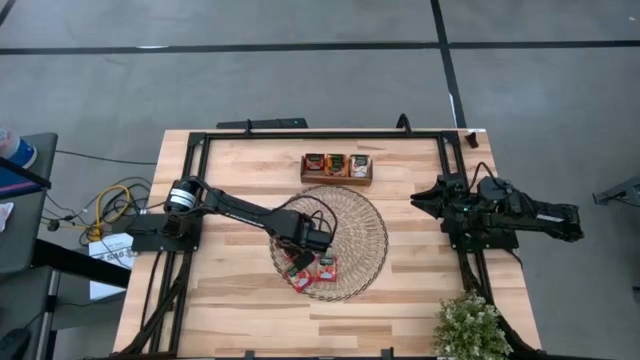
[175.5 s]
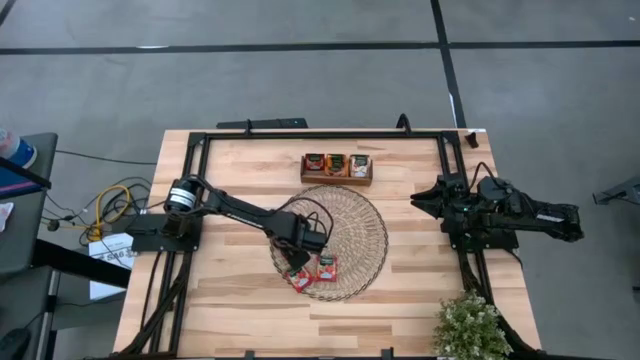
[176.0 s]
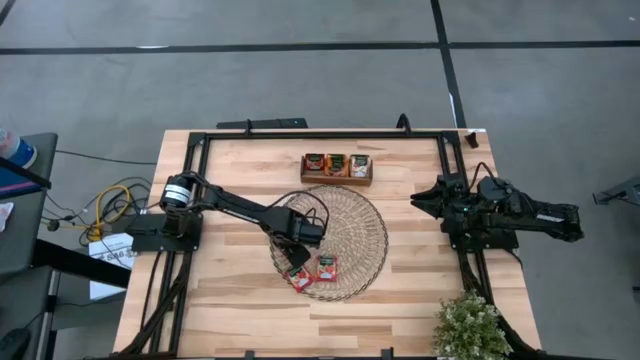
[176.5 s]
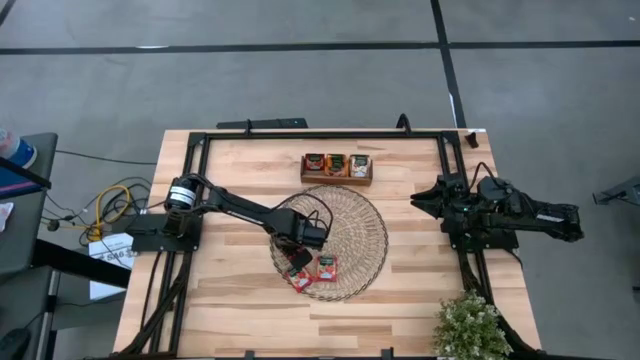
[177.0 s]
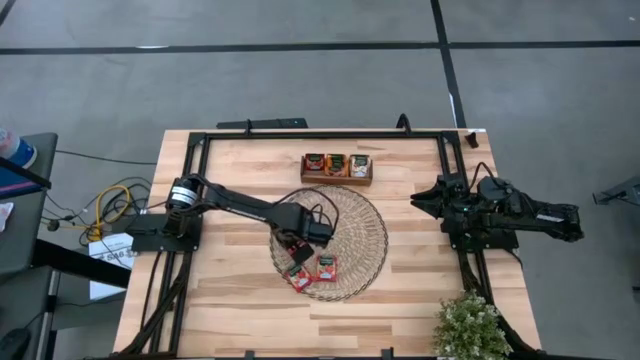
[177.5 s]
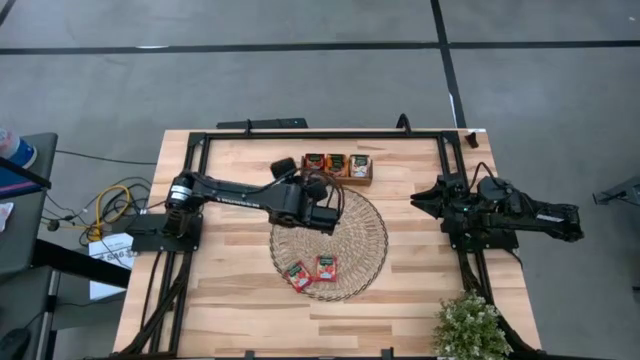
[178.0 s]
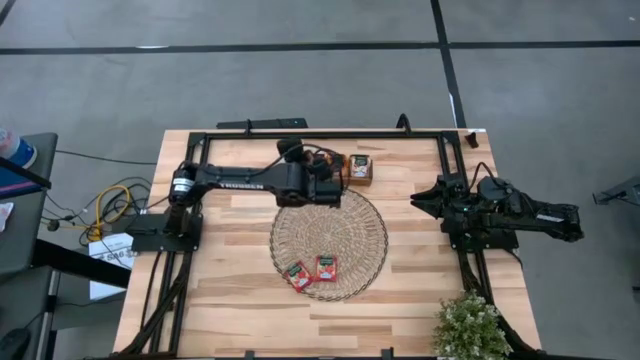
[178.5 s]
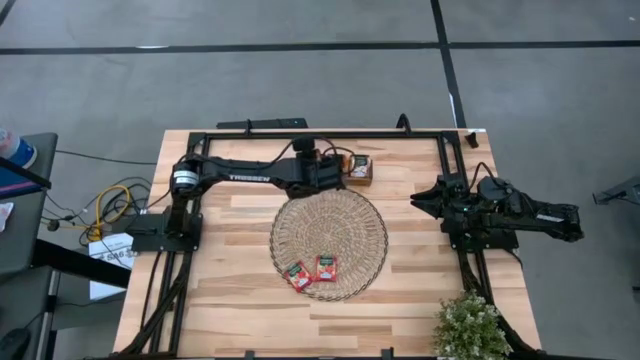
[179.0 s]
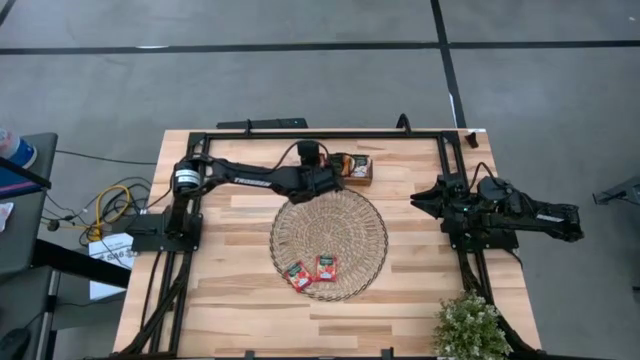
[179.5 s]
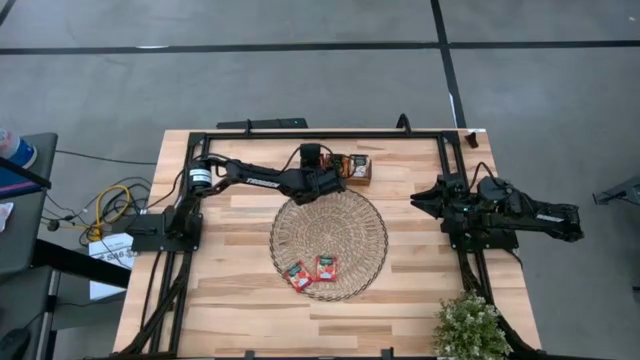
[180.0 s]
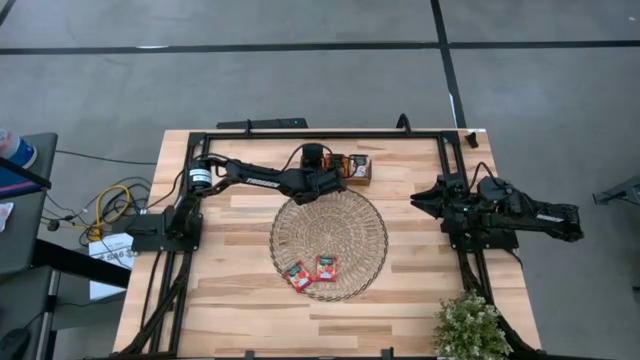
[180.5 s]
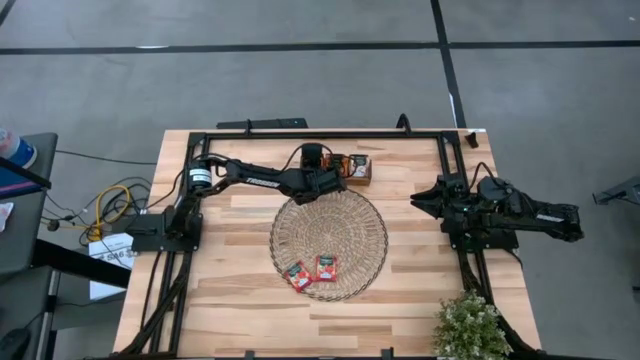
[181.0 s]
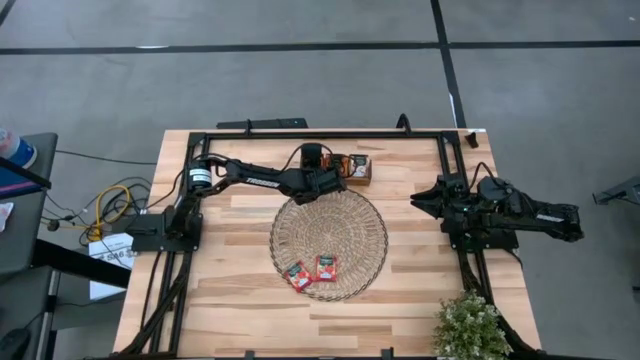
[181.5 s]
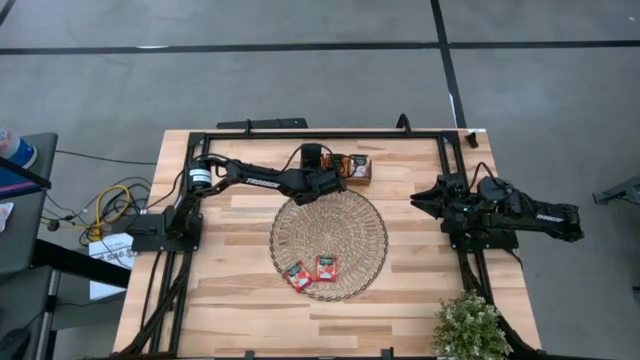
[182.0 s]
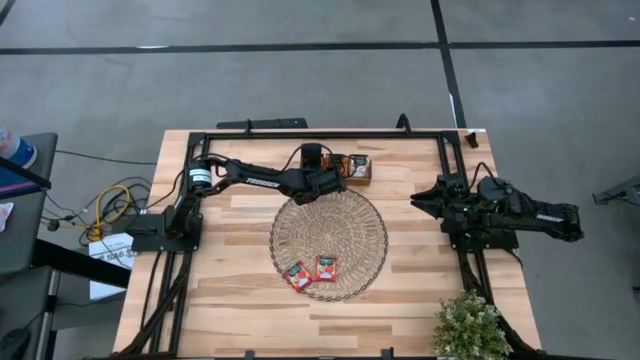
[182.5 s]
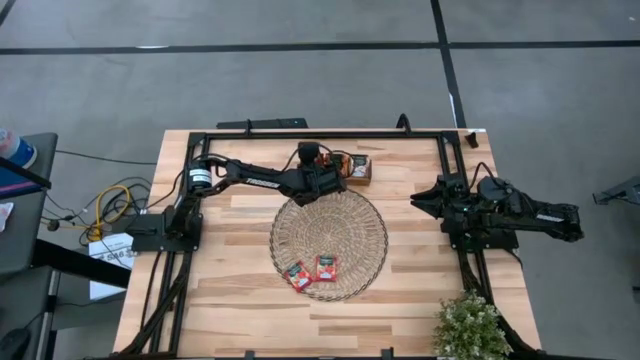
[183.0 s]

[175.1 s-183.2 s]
Task: Pick & Place Tea
Put the top red tea bag into the left slot of the wooden organizer

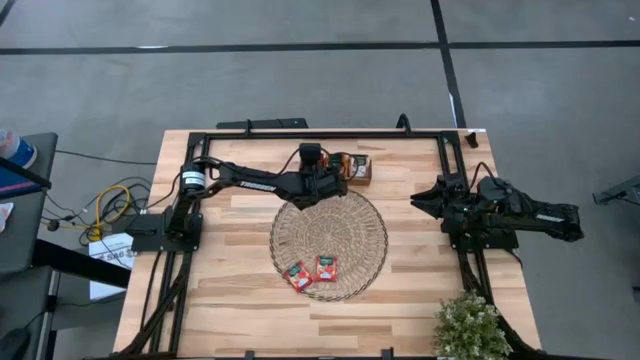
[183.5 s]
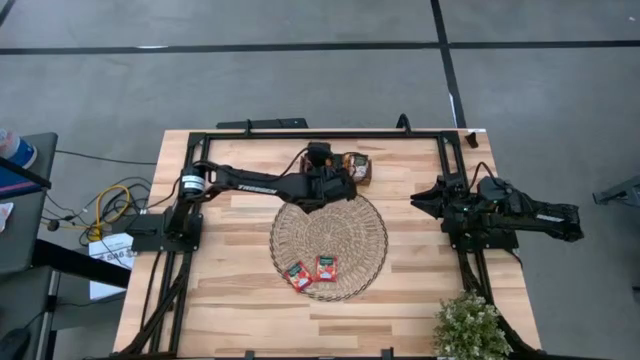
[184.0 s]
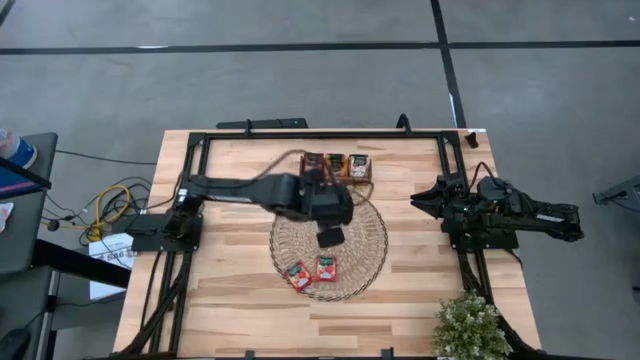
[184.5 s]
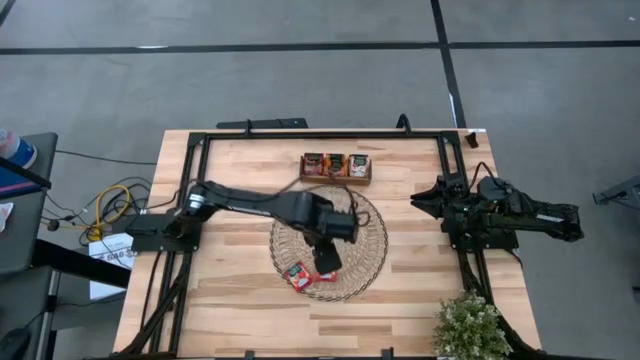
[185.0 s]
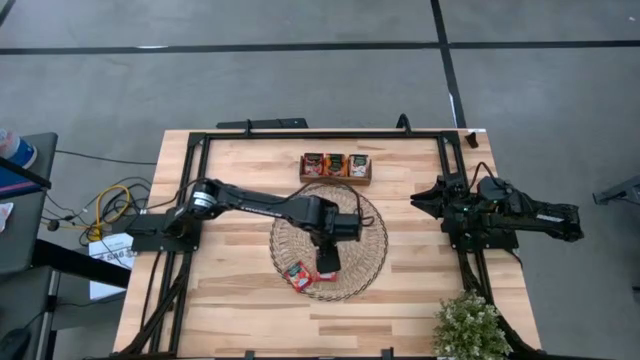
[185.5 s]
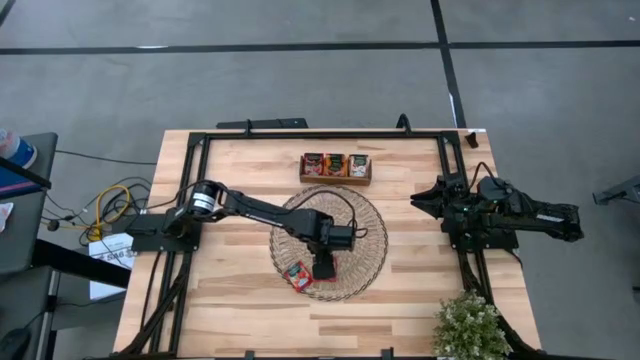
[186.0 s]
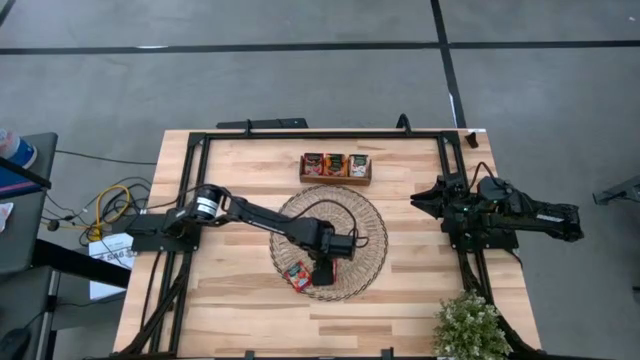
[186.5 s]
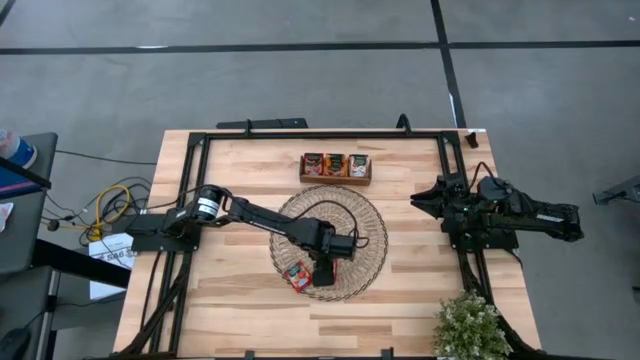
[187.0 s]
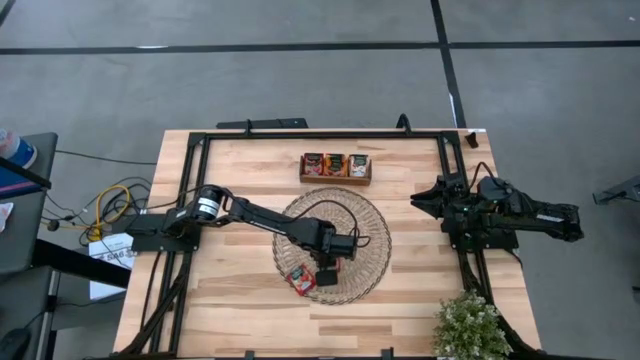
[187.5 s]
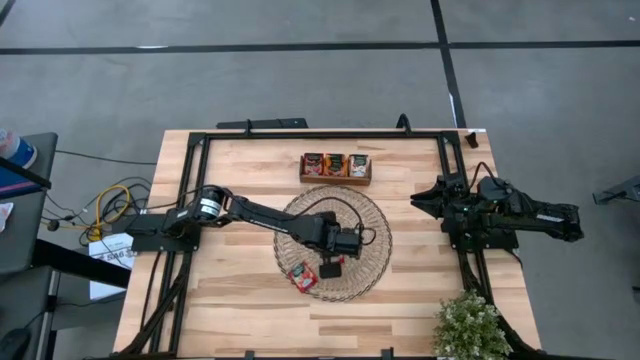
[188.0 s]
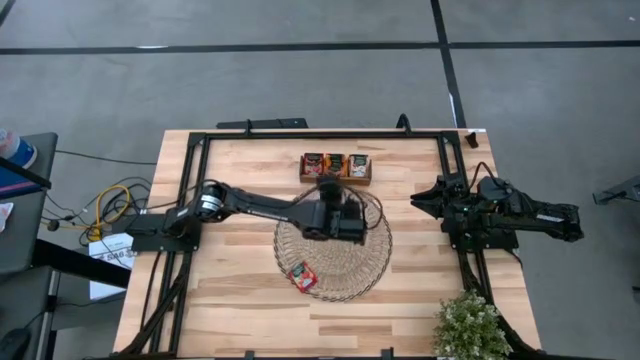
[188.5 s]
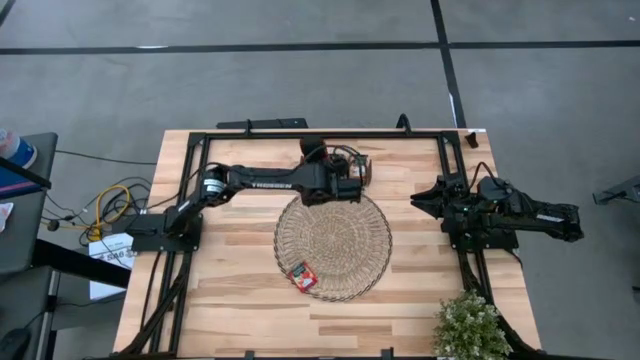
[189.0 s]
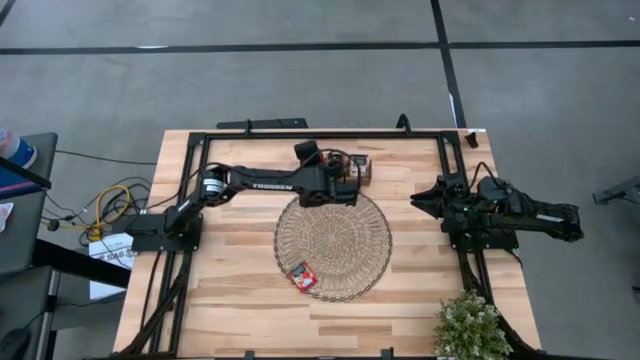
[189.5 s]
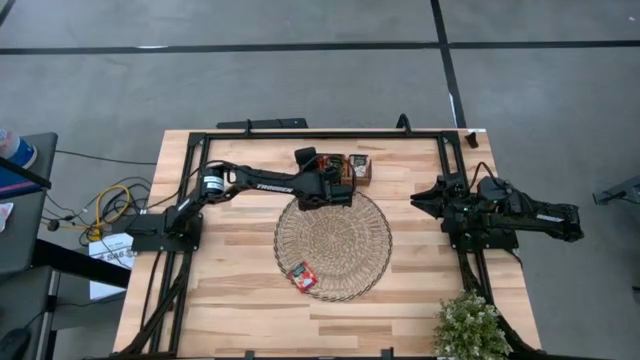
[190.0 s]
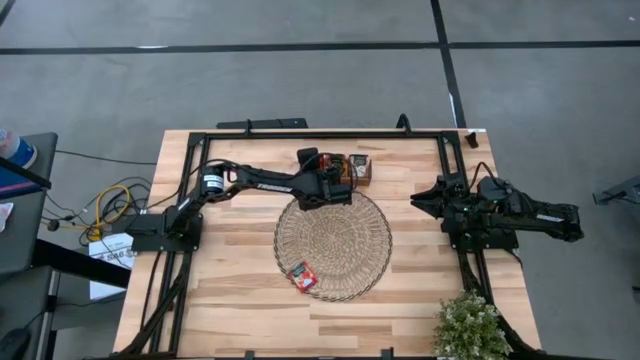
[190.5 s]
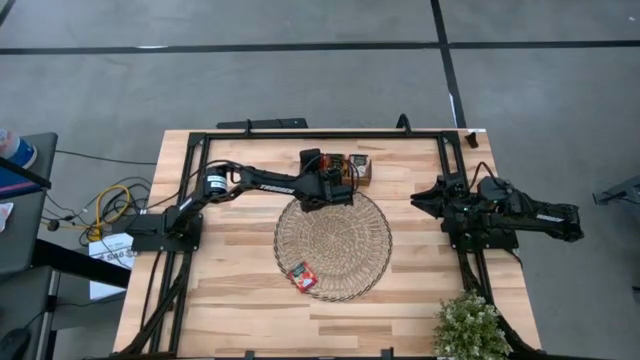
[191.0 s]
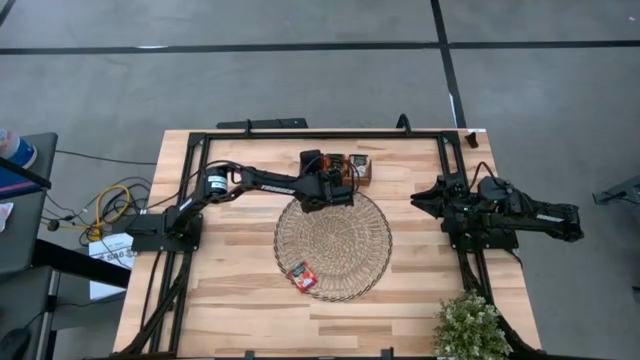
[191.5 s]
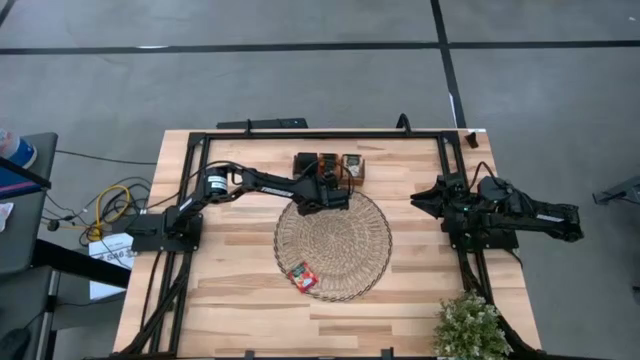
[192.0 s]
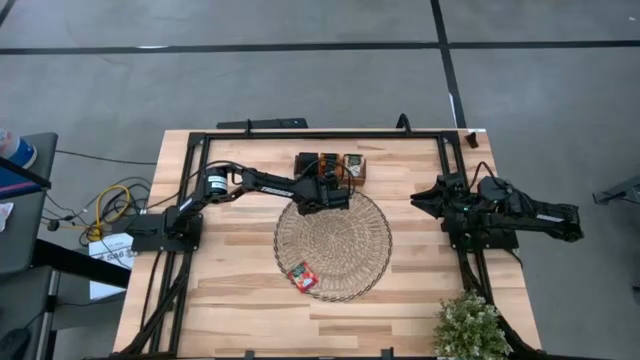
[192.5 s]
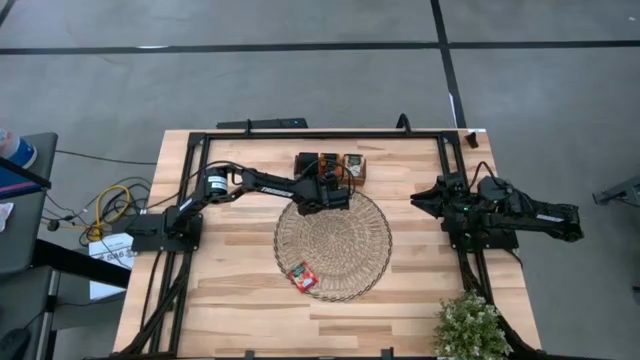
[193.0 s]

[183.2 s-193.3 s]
Put the right red tea bag into the left slot of the wooden organizer

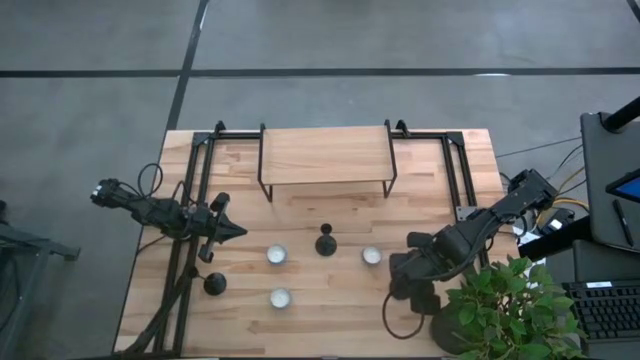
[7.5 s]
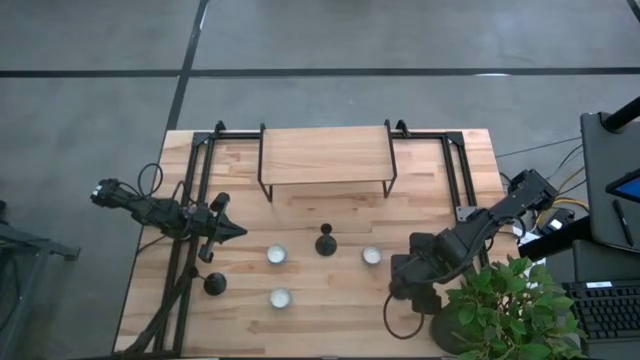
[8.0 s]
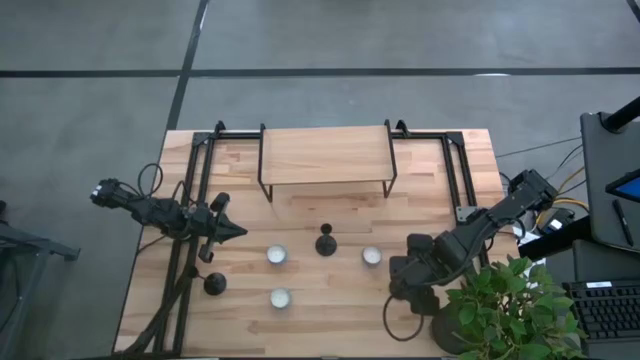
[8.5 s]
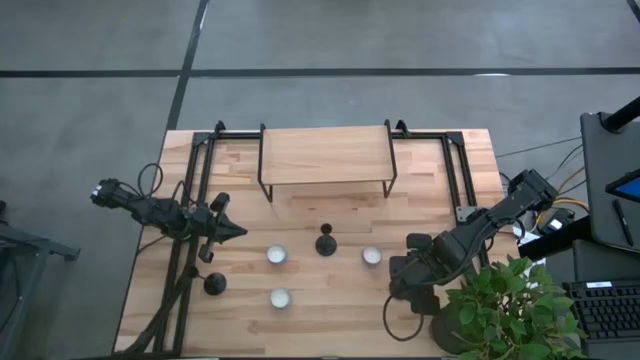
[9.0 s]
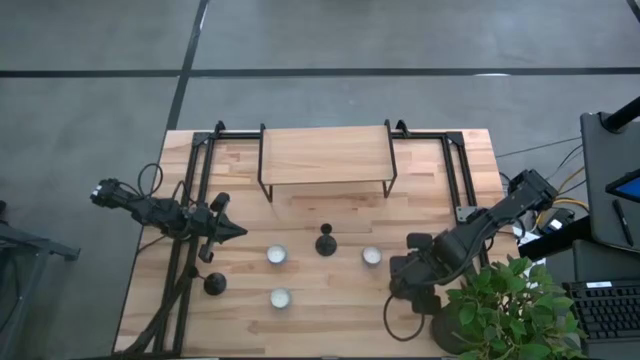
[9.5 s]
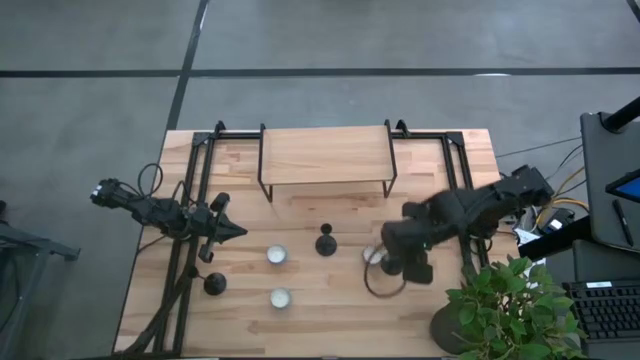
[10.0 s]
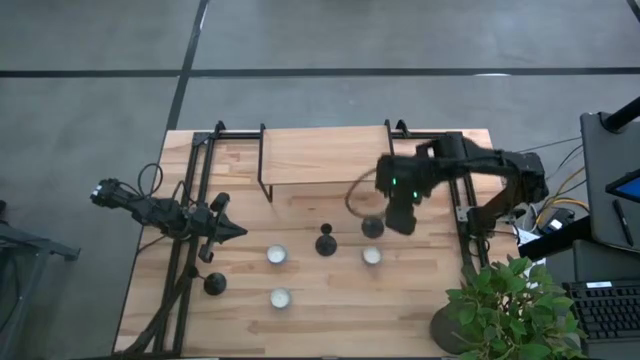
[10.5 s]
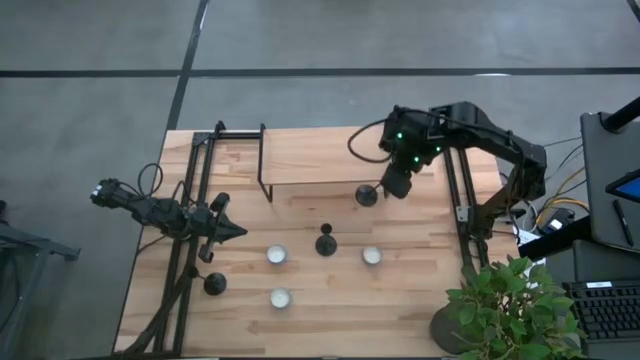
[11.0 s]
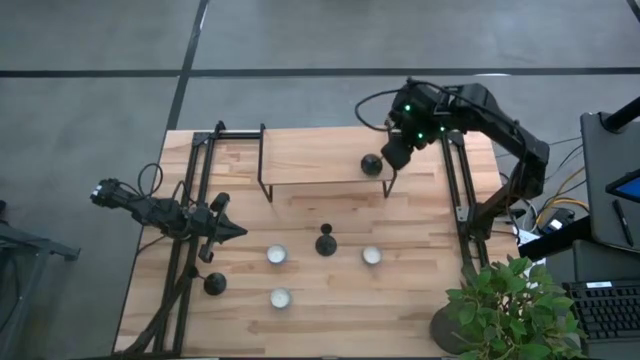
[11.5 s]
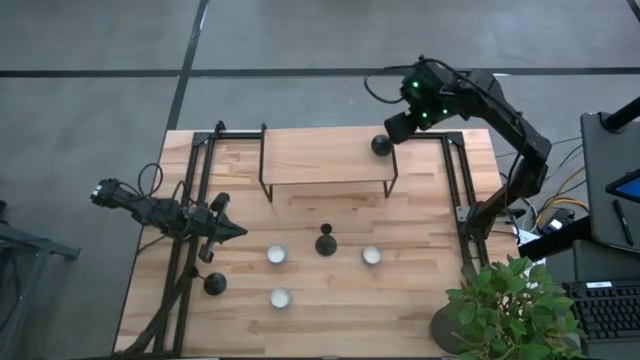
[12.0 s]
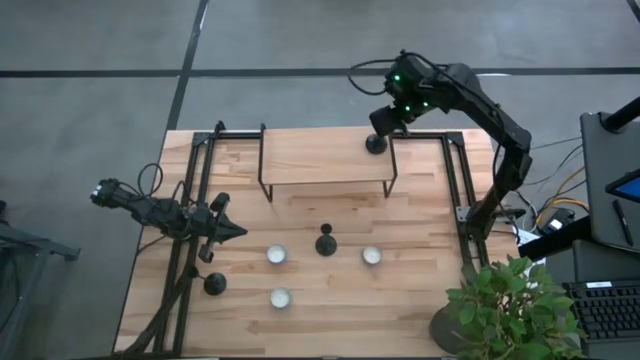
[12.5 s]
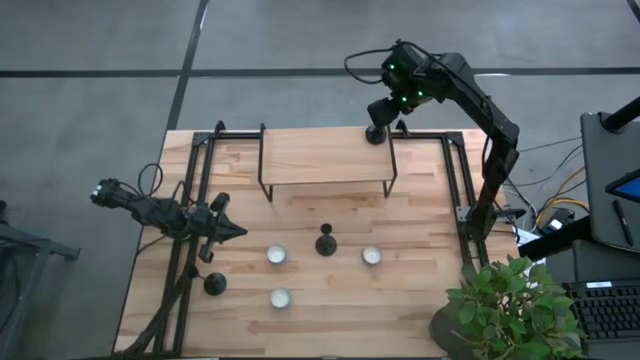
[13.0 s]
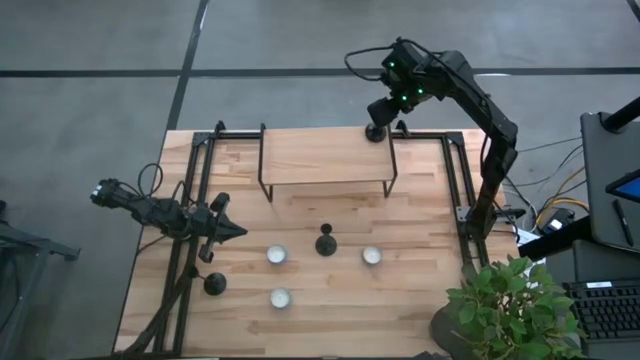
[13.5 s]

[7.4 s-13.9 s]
Task: Pick & Place candle stick holders
Put the bottom right black candle holder on the shelf
